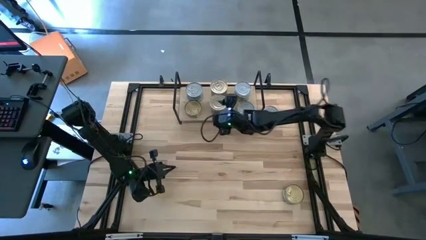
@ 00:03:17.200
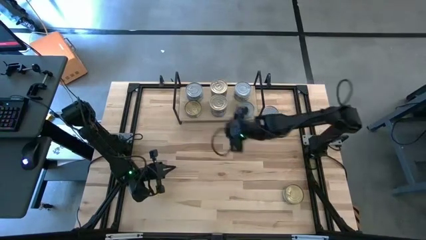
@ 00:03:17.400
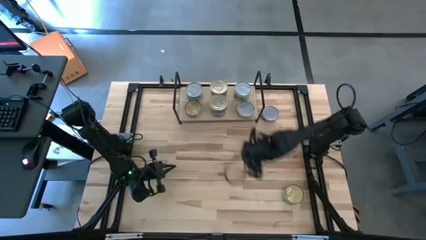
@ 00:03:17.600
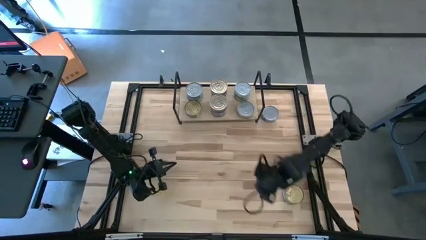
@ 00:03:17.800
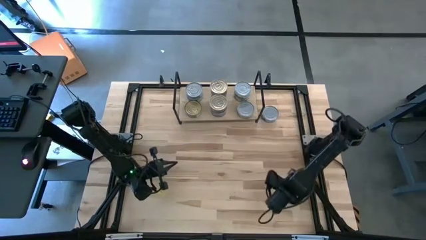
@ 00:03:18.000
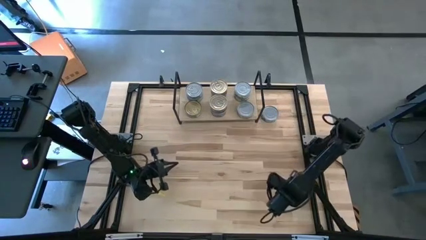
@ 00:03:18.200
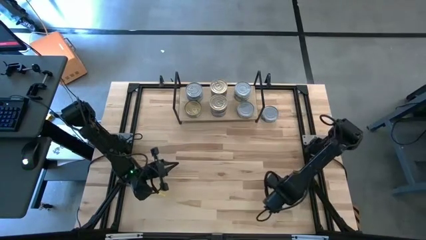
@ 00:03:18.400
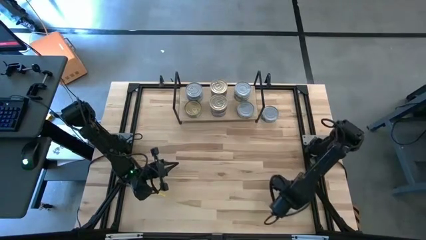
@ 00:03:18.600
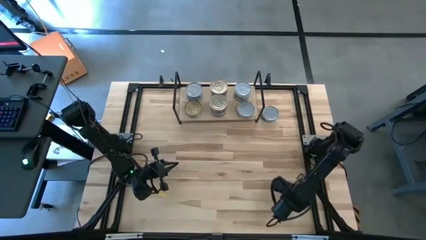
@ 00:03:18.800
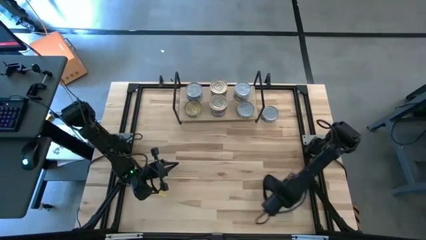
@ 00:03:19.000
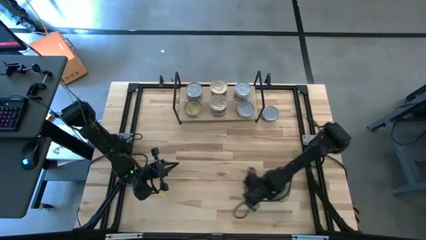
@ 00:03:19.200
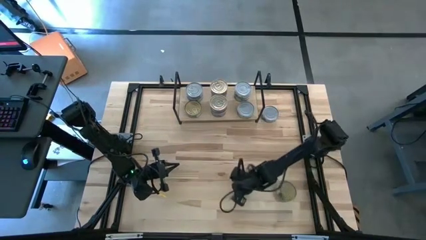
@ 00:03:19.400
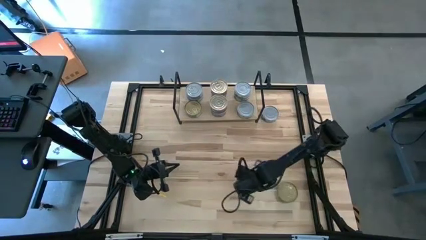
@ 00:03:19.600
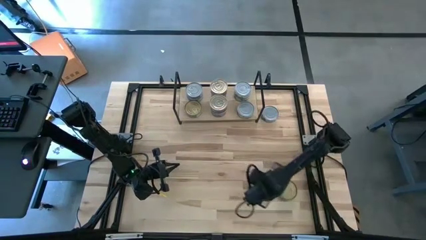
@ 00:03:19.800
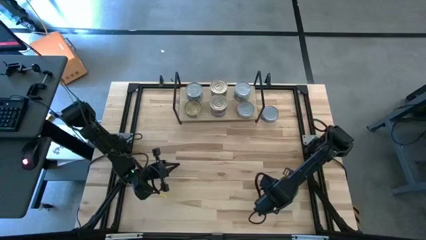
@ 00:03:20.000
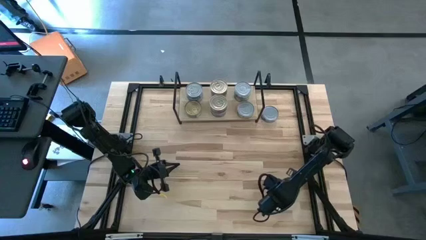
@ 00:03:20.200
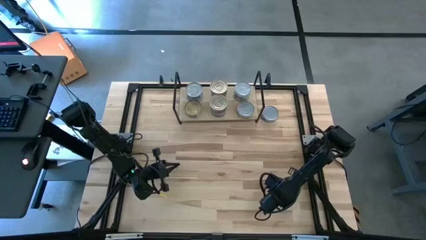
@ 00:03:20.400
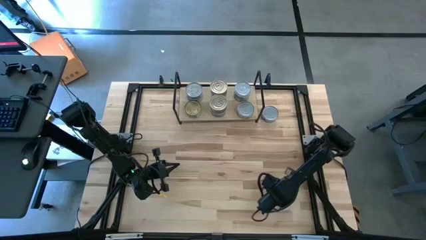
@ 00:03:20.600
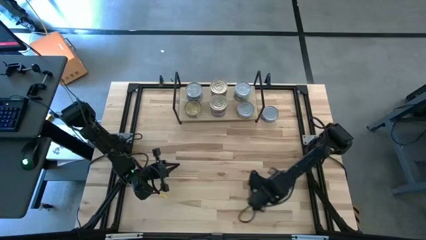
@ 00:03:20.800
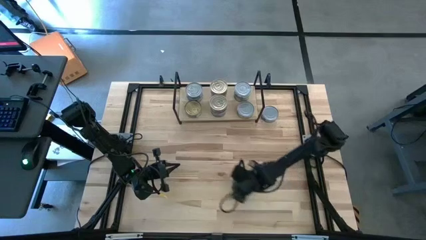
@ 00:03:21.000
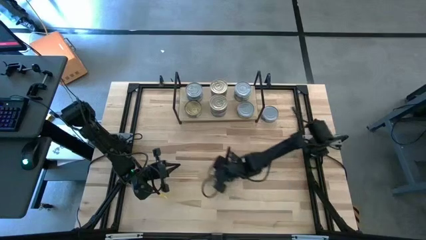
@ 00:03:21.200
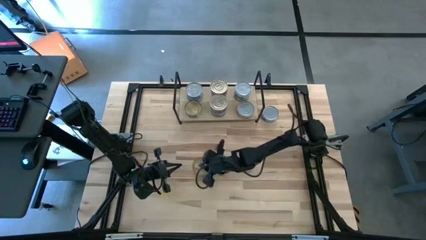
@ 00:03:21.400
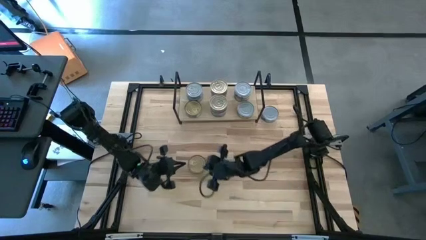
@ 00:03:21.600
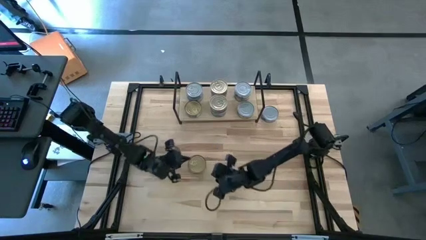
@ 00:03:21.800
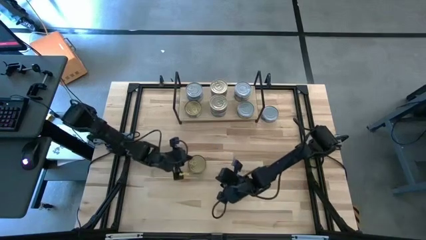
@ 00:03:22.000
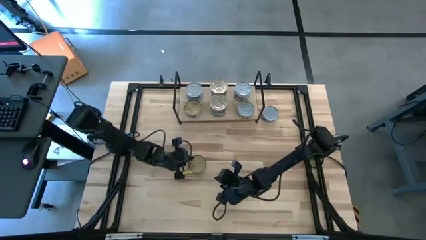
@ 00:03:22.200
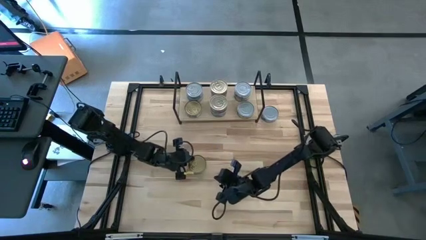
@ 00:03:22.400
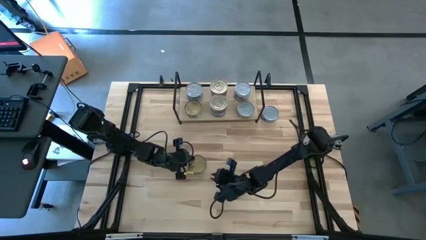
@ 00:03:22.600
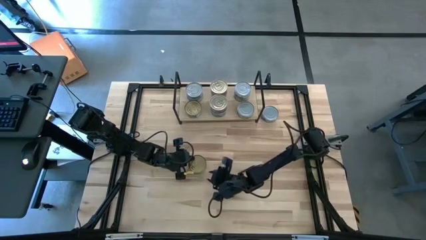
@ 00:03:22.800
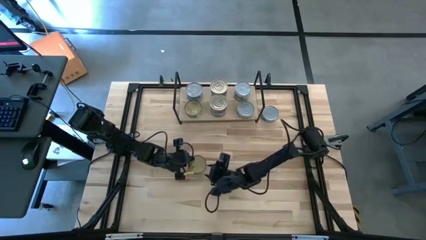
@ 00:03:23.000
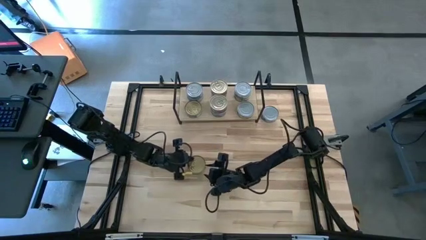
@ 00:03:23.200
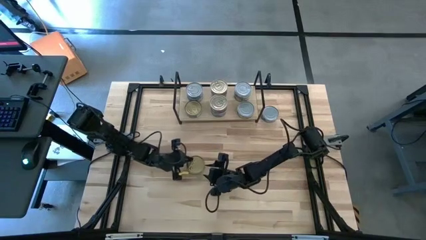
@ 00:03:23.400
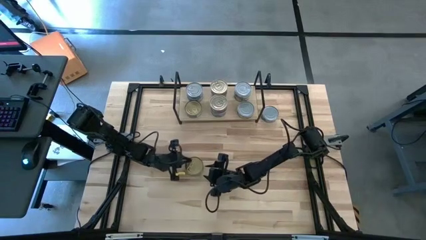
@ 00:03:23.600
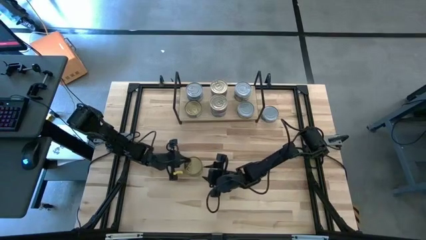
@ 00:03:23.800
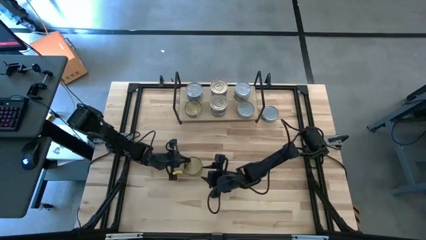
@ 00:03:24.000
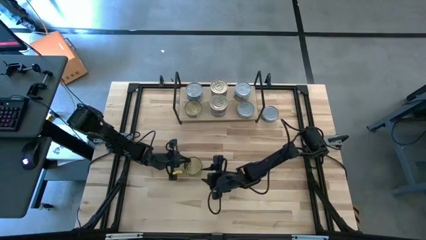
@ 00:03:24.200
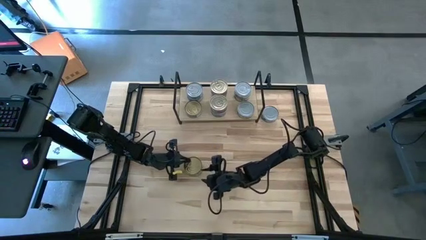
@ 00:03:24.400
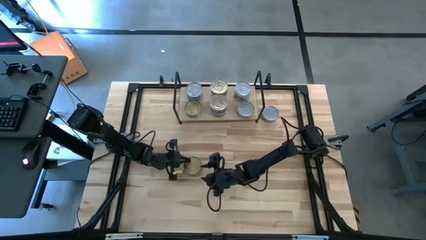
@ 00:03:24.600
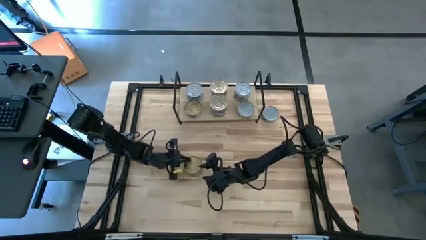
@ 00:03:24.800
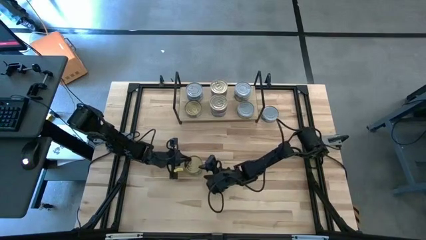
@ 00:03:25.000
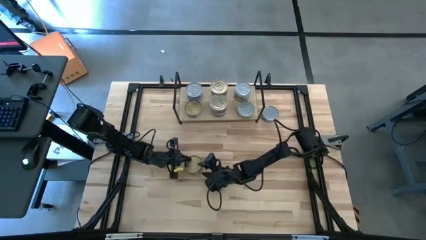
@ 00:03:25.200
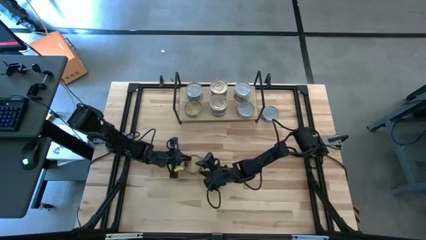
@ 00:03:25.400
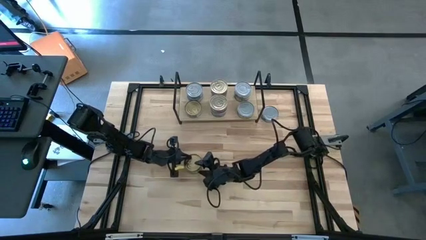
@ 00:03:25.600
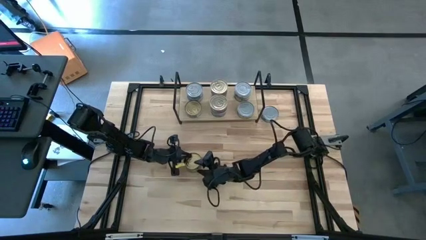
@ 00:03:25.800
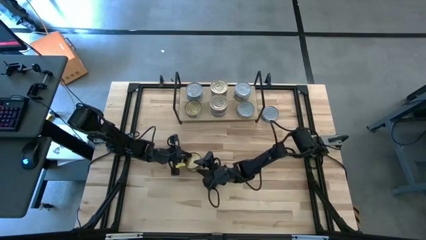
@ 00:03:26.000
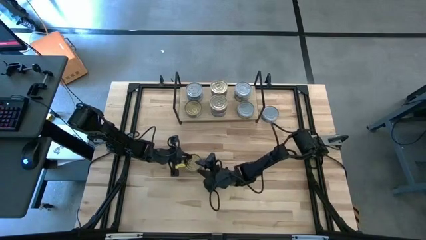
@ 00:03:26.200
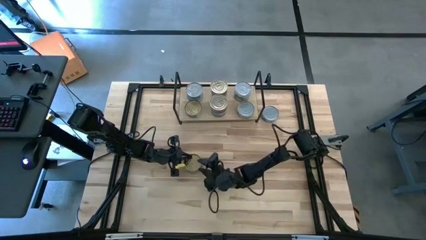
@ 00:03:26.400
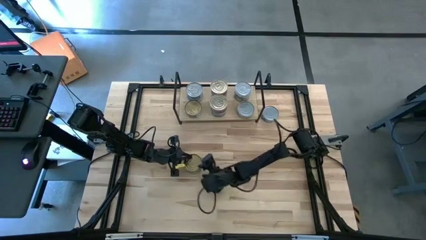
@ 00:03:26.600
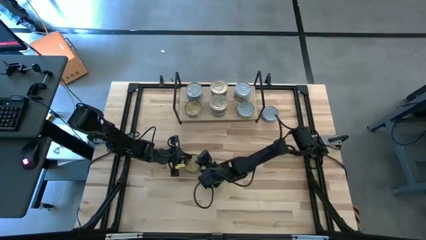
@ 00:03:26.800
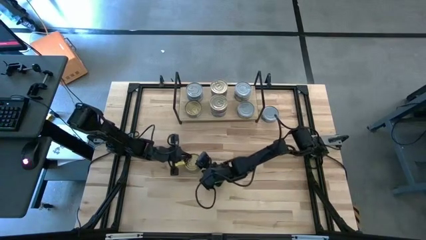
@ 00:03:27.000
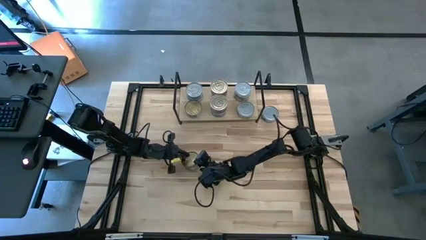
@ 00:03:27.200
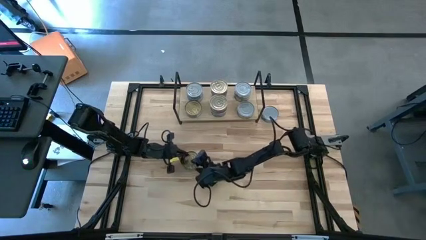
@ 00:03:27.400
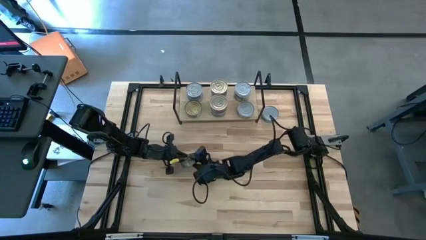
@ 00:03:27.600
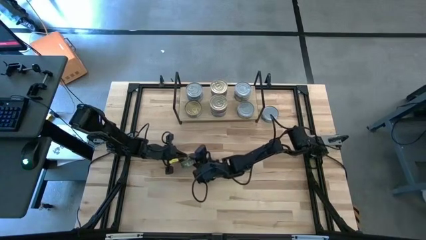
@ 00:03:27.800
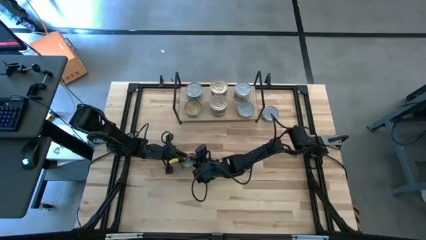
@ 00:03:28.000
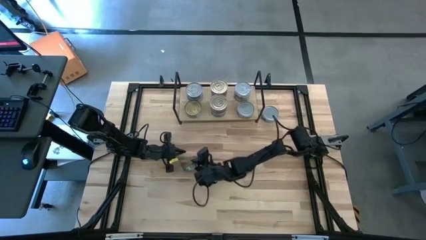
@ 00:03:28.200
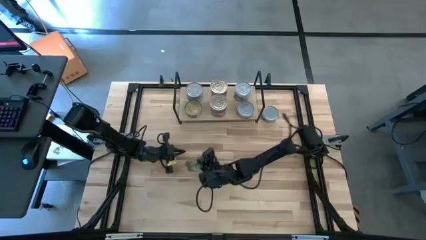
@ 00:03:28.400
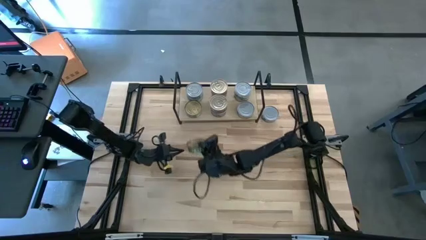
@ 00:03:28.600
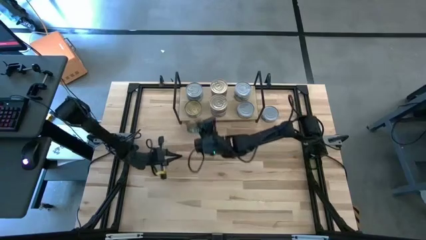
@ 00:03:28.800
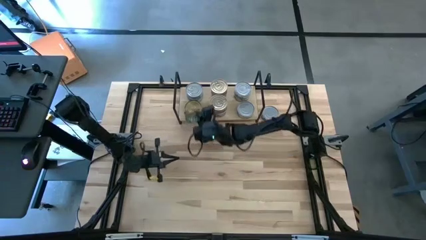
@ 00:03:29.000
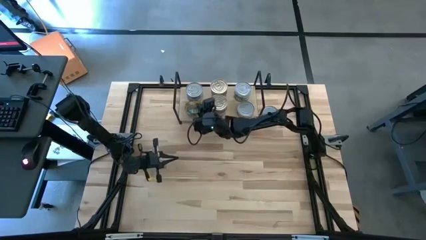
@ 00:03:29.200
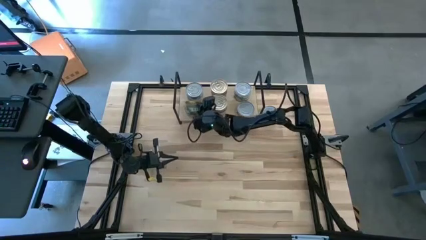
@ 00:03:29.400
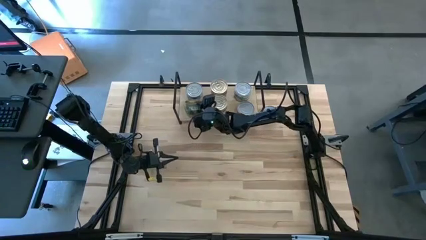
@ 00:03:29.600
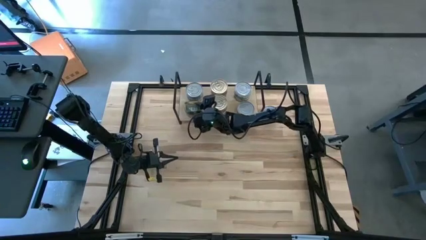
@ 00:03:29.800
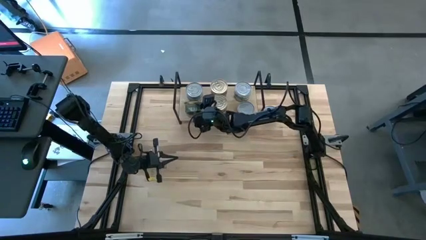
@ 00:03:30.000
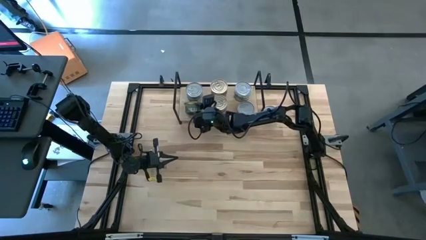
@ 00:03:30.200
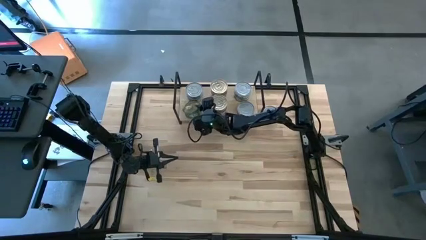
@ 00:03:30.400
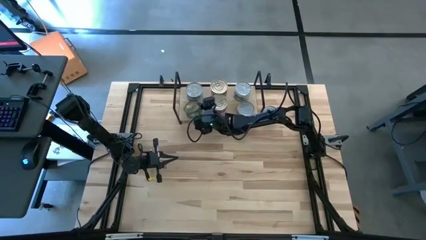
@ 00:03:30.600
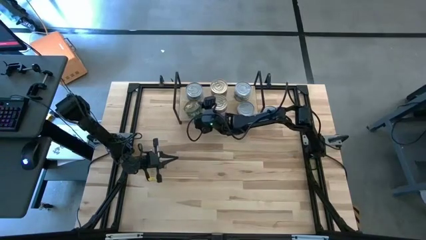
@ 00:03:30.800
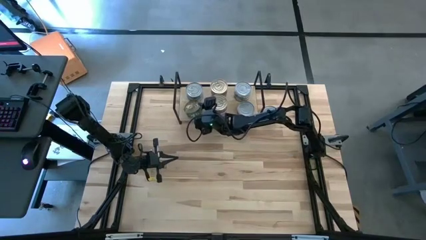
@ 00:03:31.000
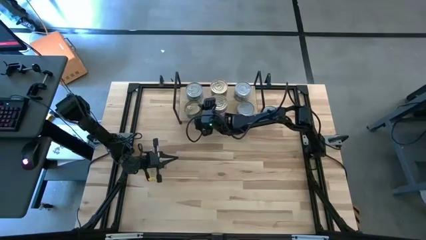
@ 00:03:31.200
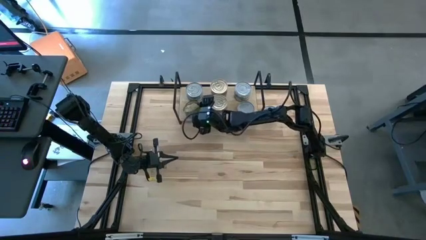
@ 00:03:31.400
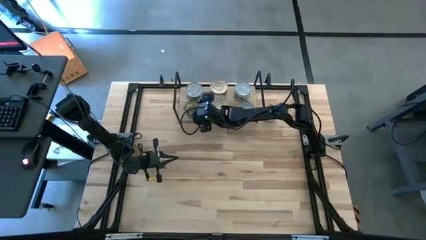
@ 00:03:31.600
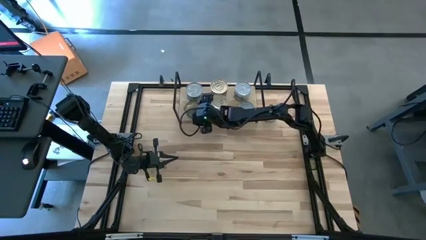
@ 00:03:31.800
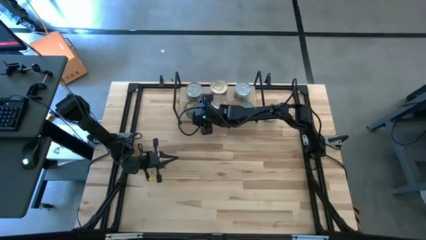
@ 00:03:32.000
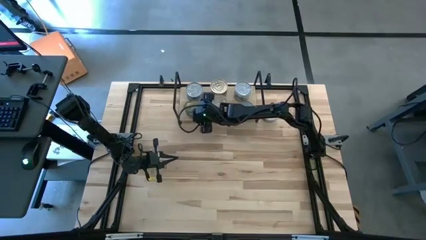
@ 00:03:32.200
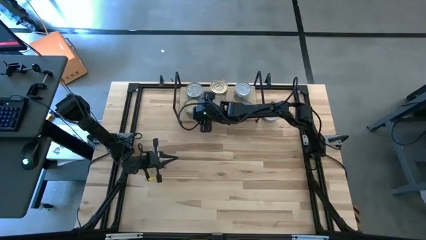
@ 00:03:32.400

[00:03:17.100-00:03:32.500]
Task: Stack canned seafood by type on shelf
Stack the green and blue tuna can on the green and blue tuna can on the shelf
